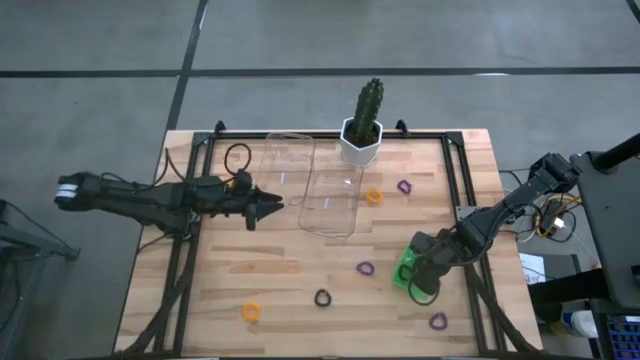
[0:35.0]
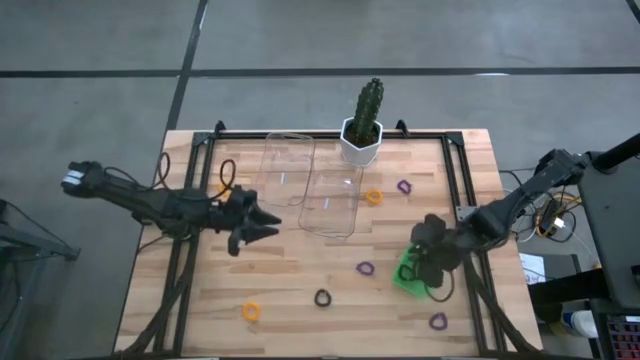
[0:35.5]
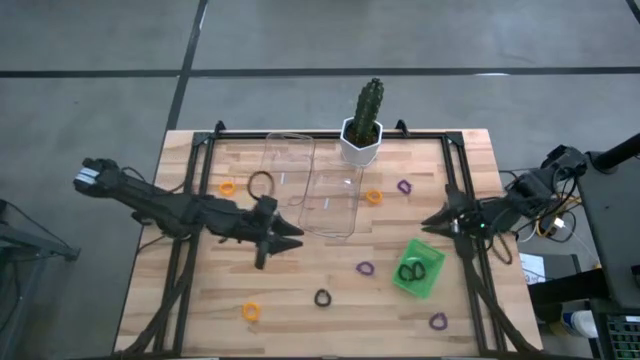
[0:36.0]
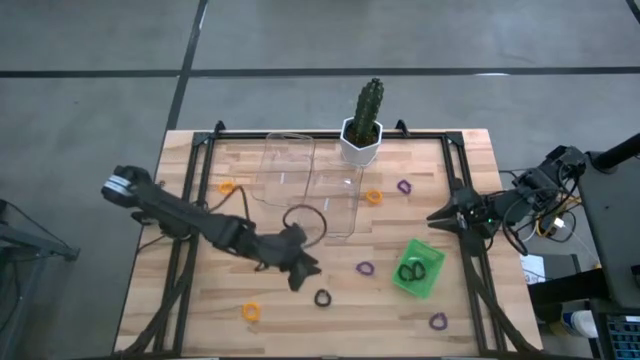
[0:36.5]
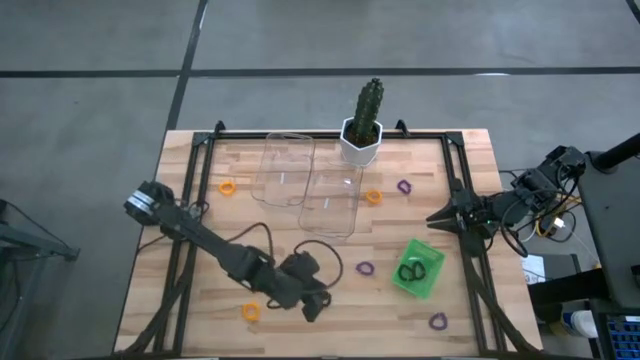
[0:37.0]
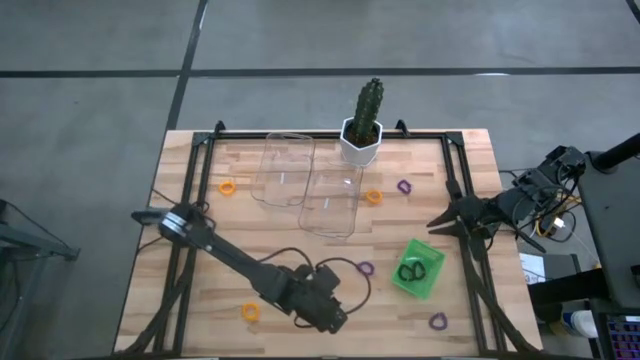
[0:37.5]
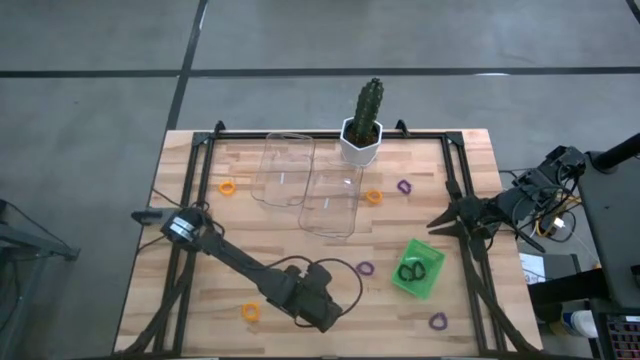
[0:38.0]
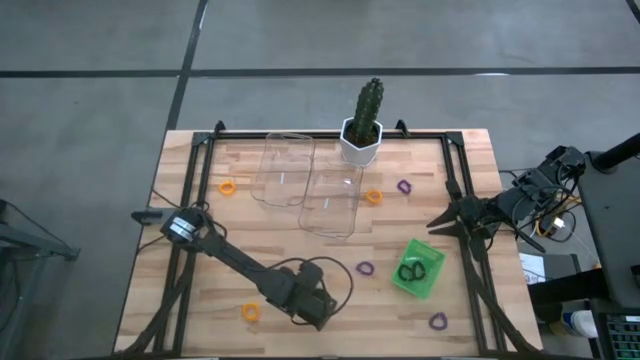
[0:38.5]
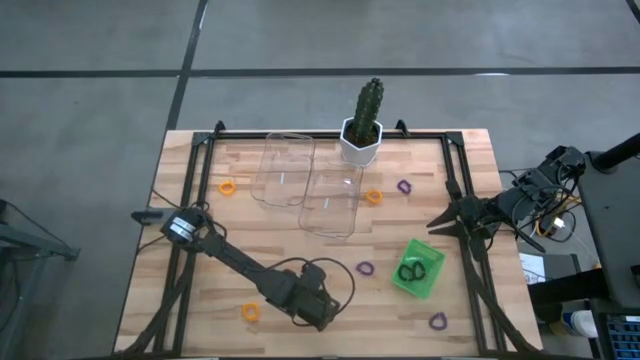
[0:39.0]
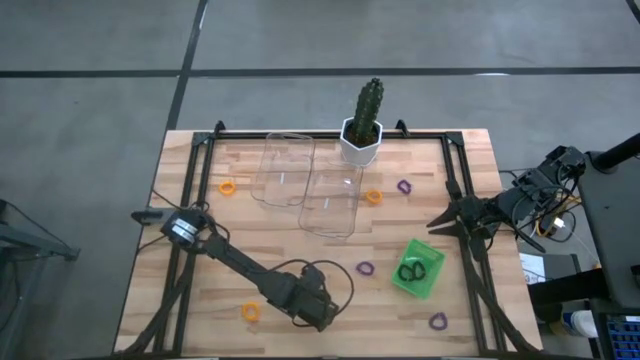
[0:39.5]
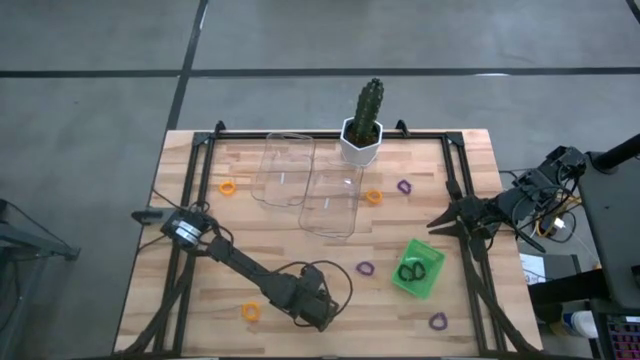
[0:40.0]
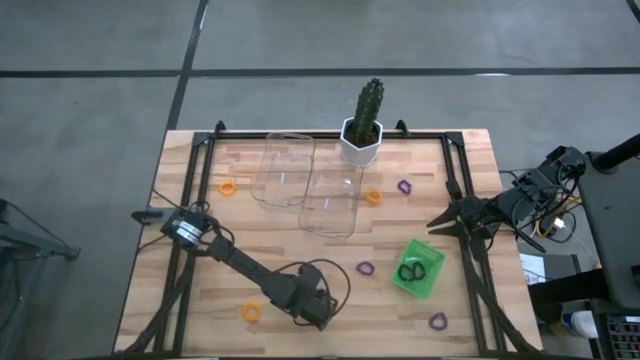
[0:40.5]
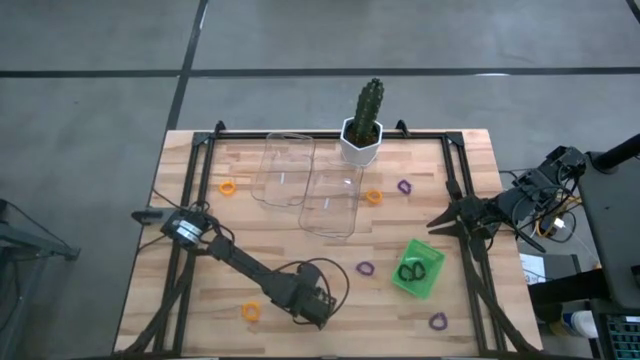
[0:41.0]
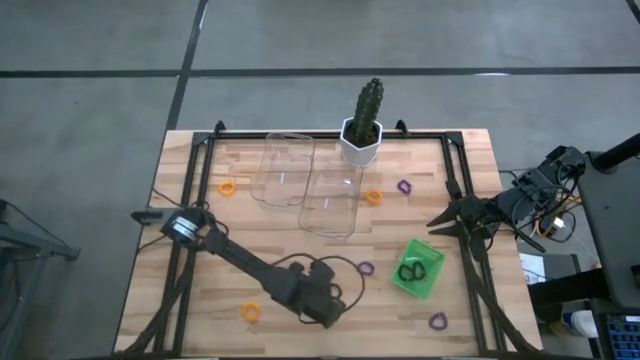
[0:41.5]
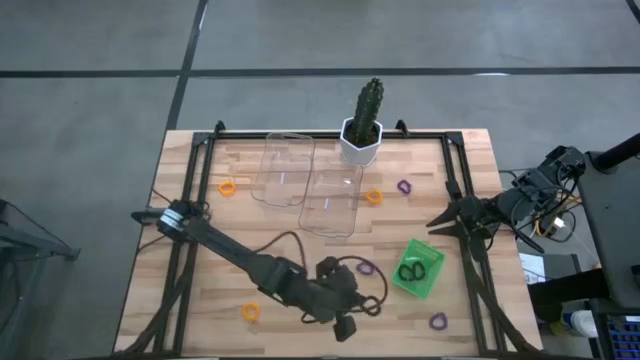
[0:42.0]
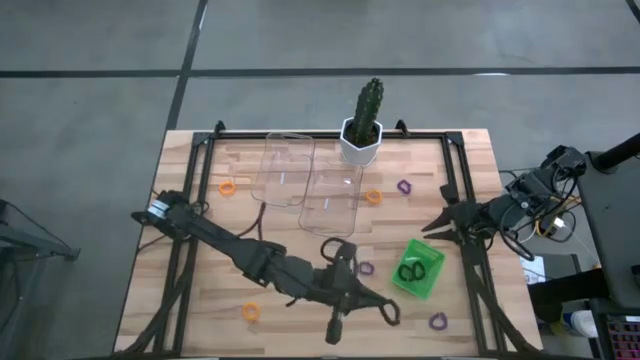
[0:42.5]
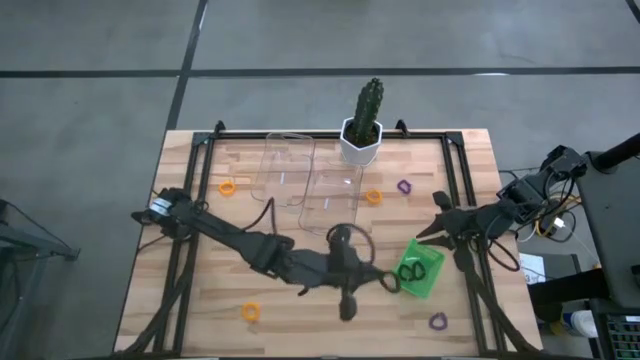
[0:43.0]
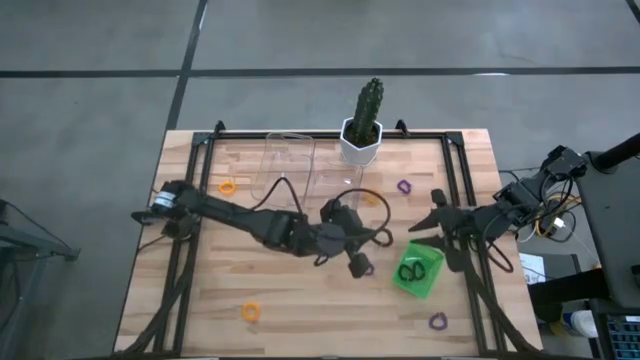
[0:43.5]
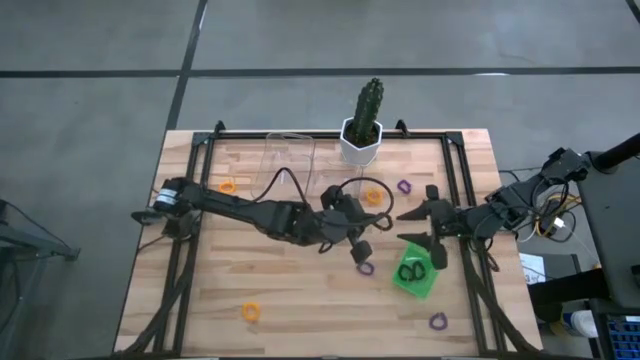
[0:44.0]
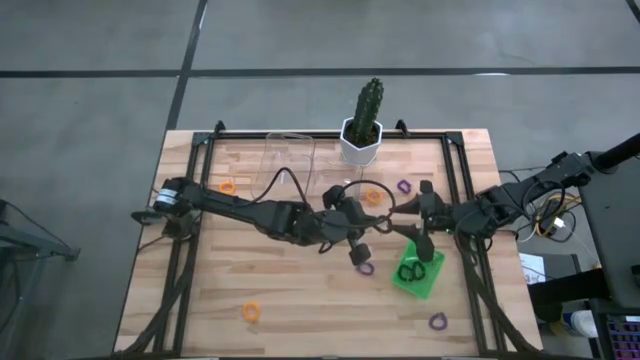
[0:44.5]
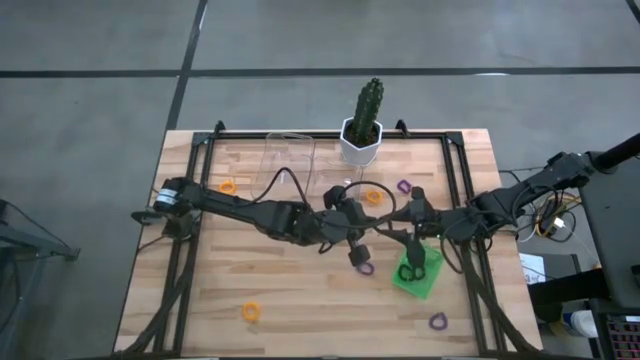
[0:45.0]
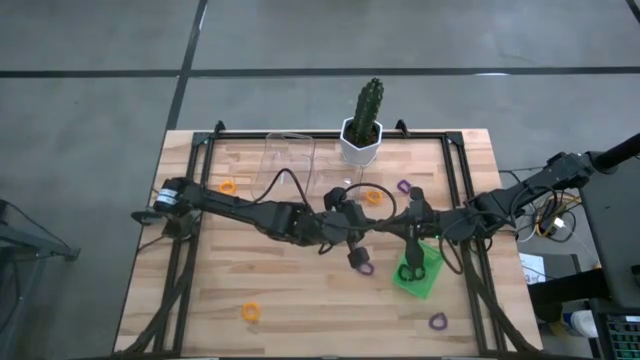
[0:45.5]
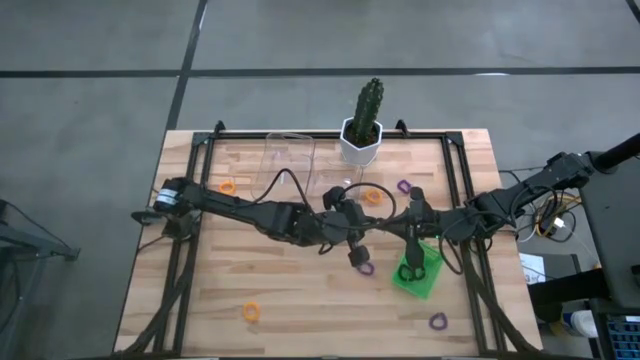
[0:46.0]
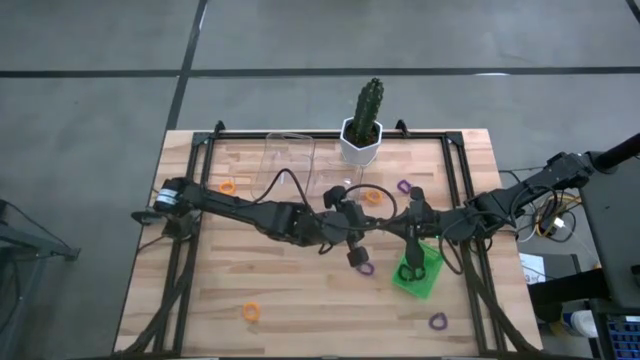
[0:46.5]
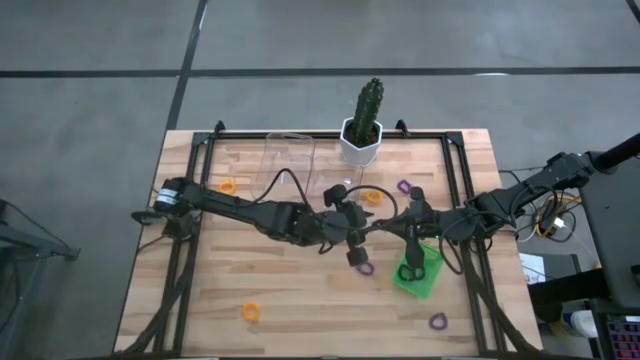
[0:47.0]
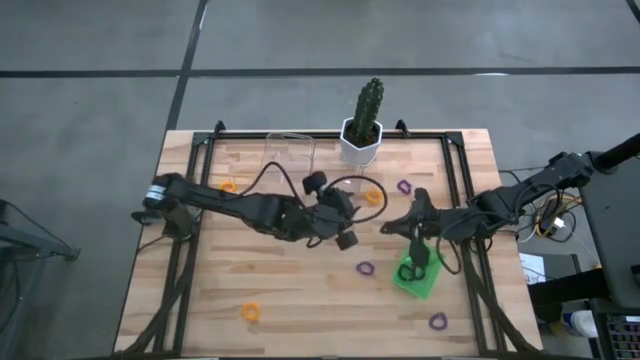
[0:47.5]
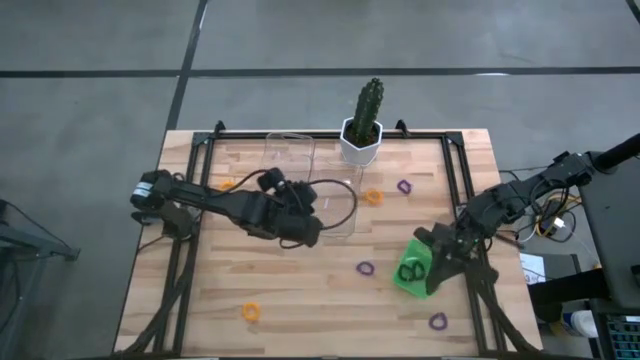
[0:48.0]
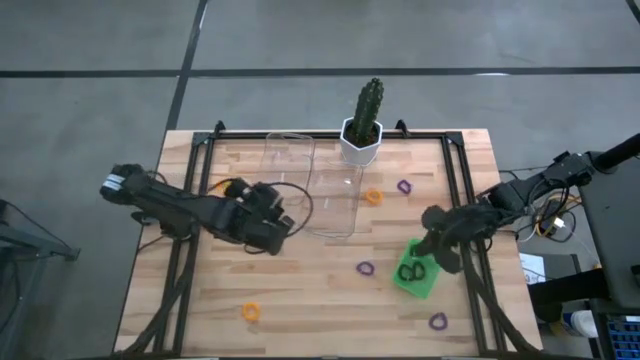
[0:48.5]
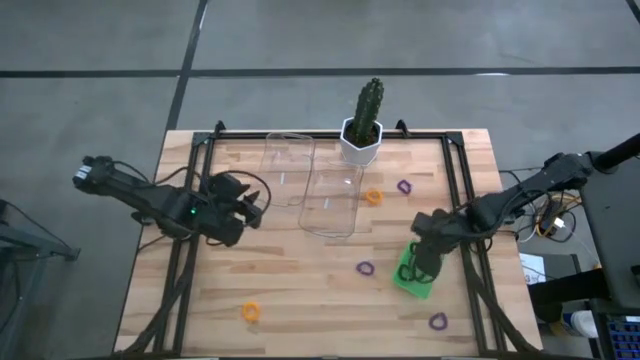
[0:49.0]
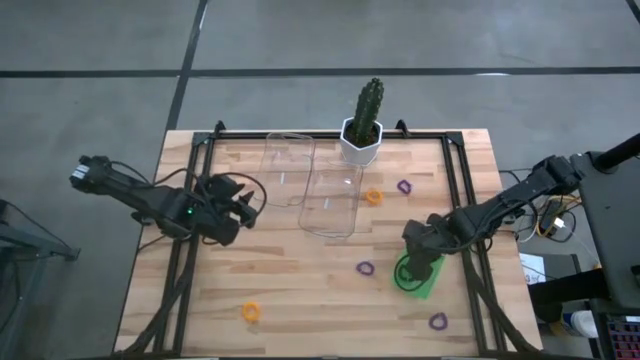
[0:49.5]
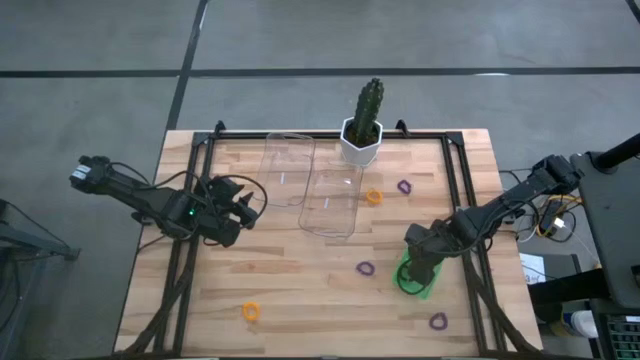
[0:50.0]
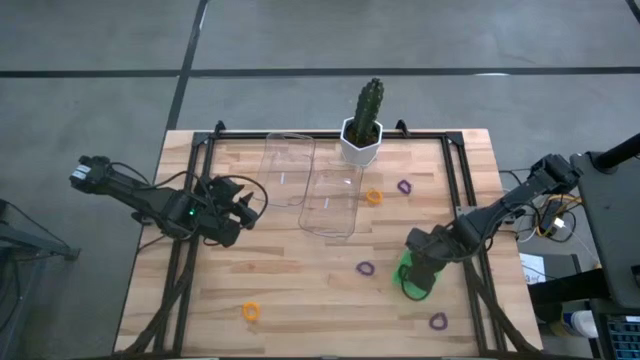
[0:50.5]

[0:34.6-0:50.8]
Task: Sort spring keychains
Put the black spring keychain into the green bin

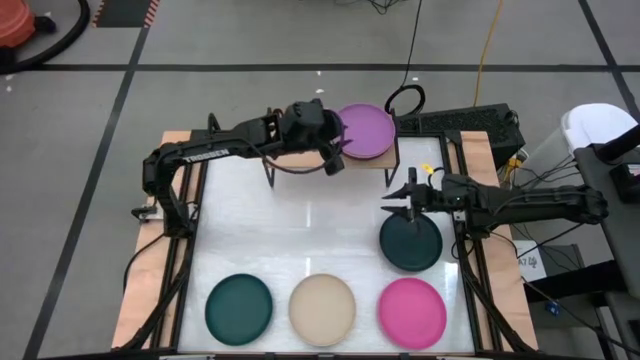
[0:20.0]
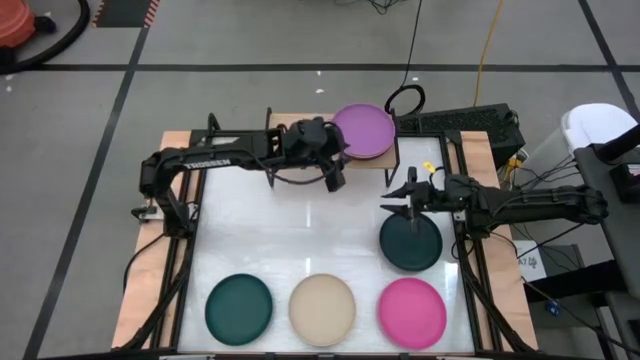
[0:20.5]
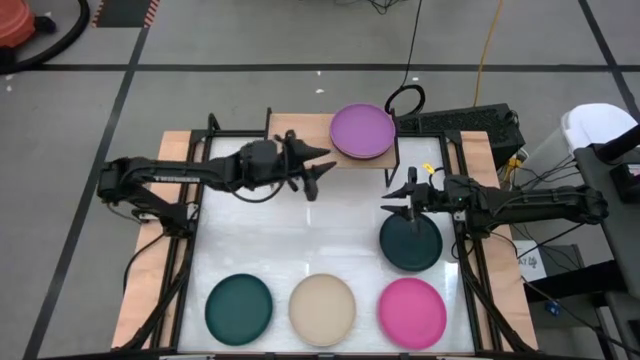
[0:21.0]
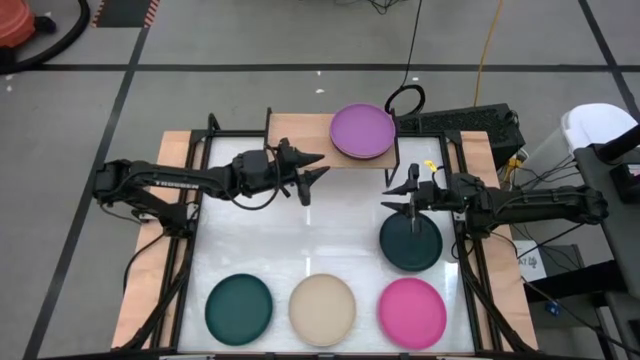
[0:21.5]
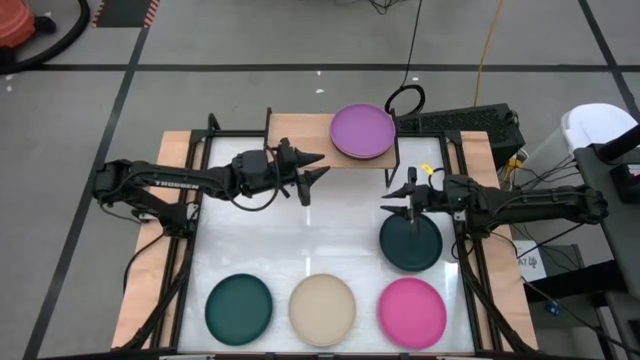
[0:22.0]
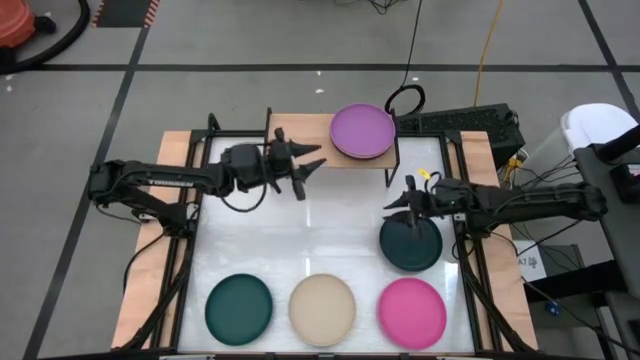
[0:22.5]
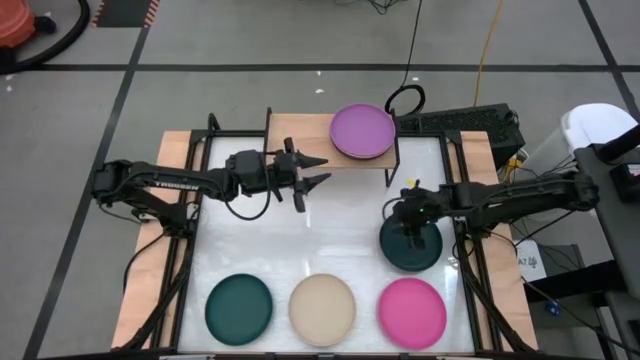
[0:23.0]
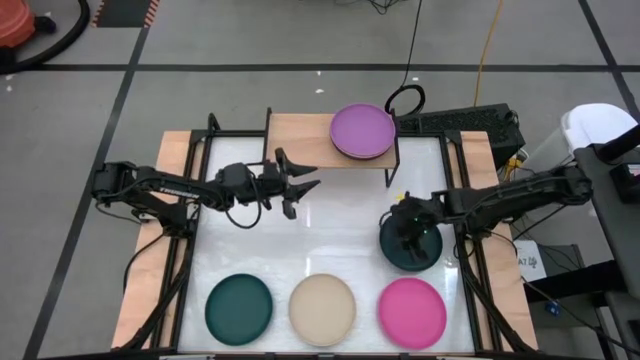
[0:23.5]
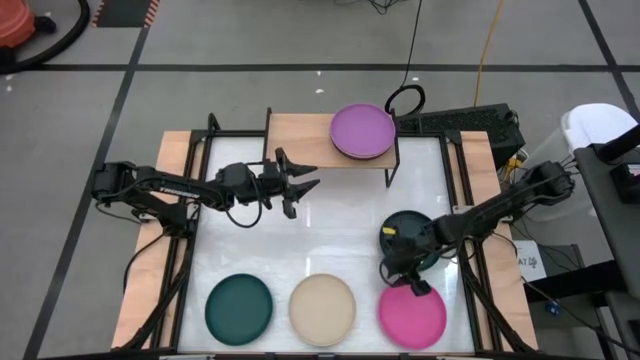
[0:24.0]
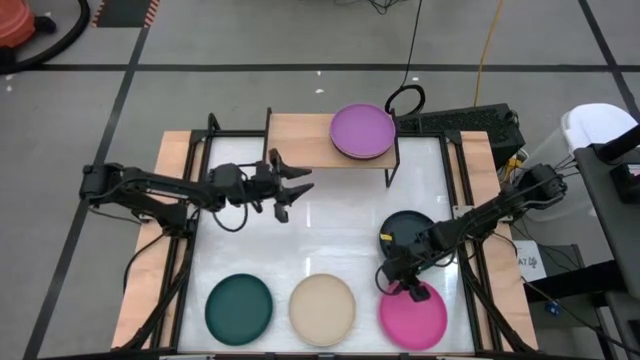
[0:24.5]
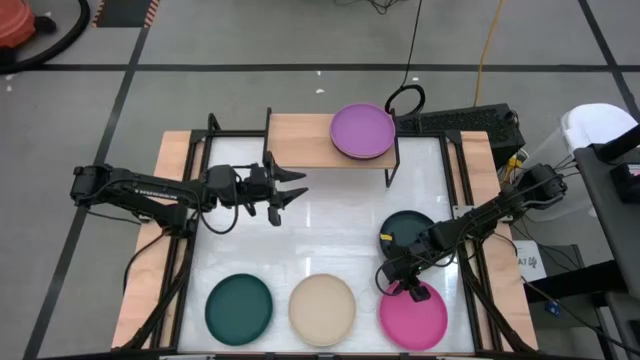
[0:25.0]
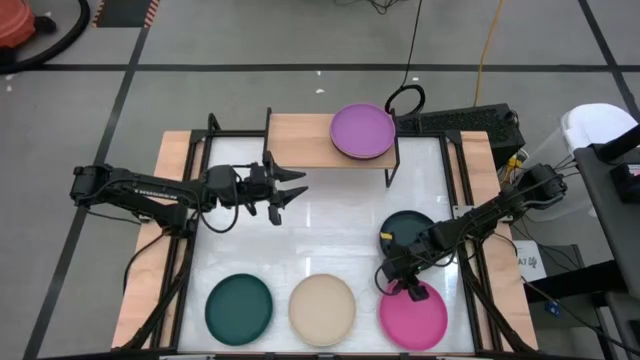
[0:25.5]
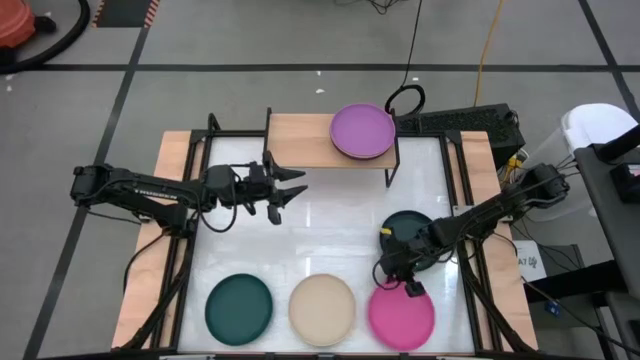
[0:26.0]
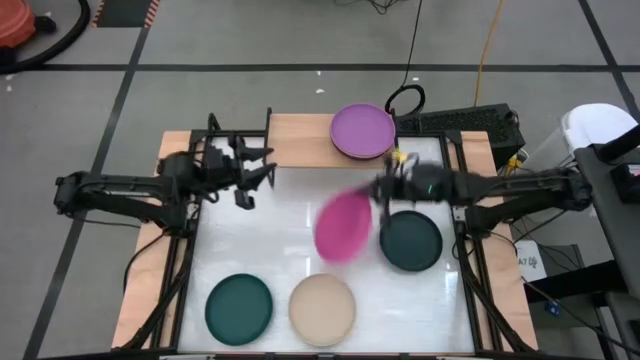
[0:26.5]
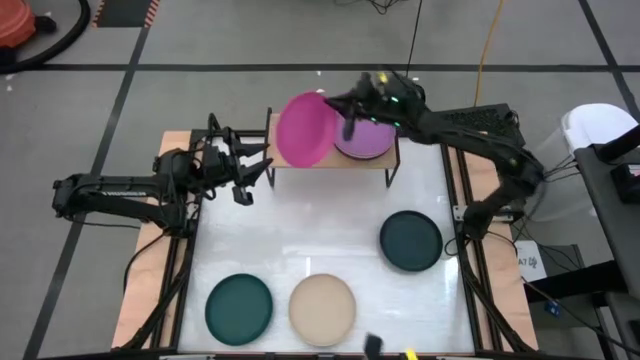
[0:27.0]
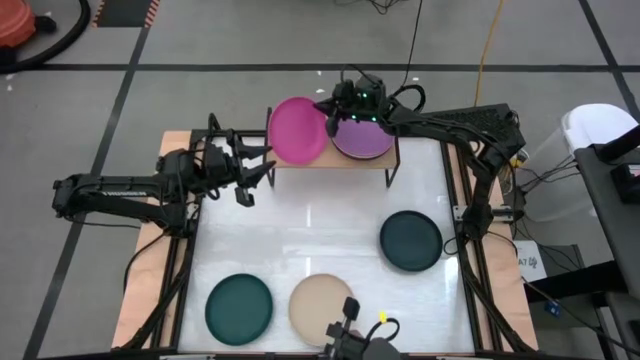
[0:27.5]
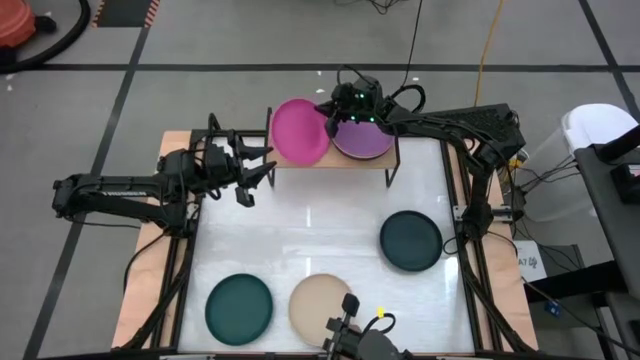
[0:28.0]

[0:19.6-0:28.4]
Task: Place and stack plates onto a shelf
Put the pink plate on the shelf
